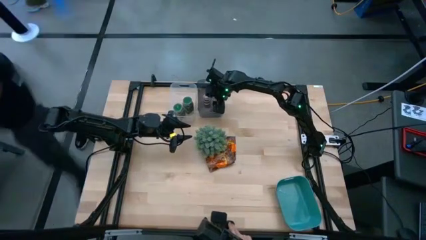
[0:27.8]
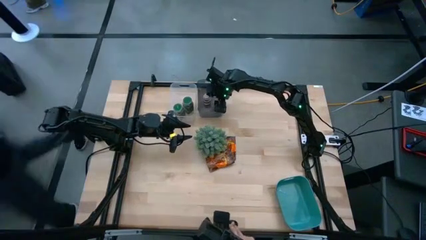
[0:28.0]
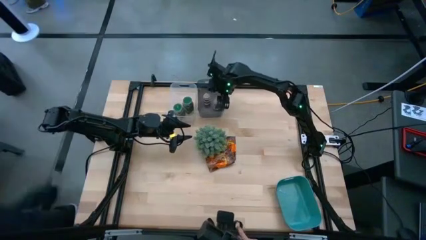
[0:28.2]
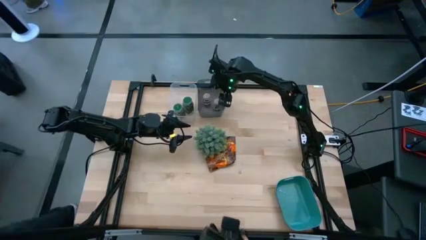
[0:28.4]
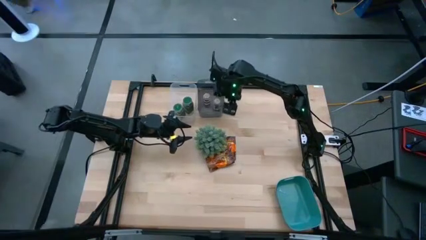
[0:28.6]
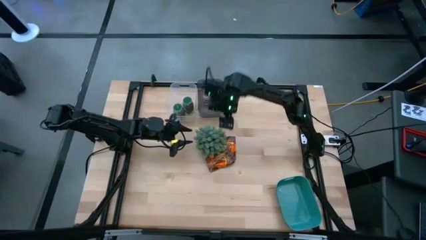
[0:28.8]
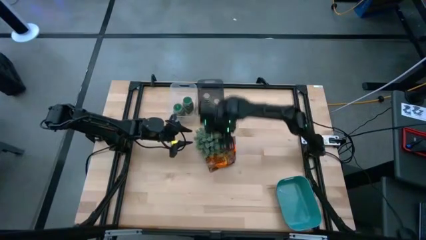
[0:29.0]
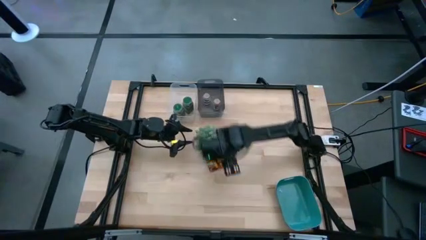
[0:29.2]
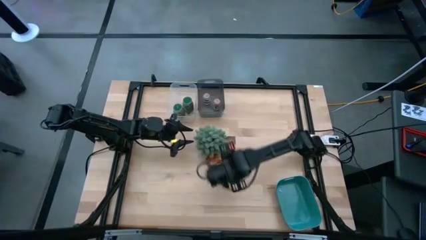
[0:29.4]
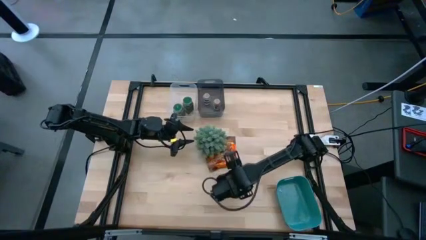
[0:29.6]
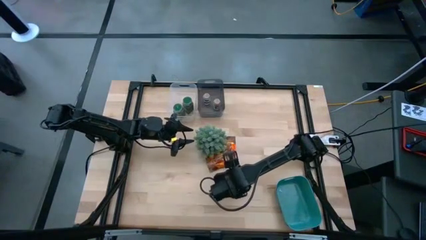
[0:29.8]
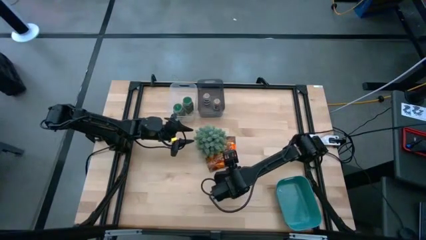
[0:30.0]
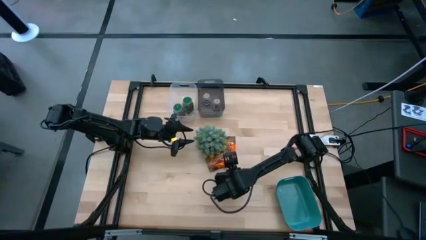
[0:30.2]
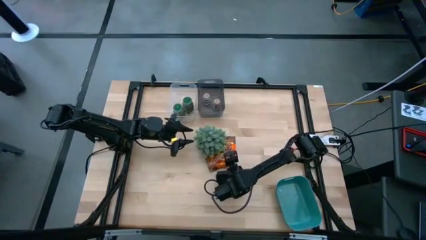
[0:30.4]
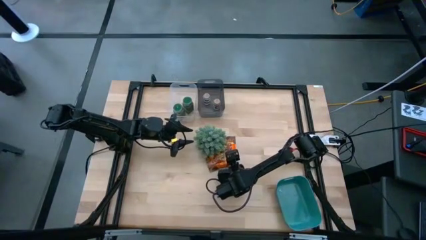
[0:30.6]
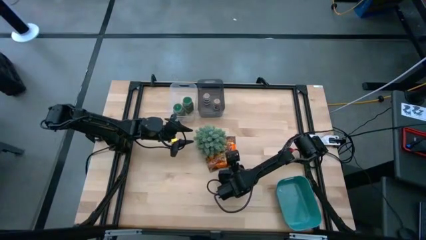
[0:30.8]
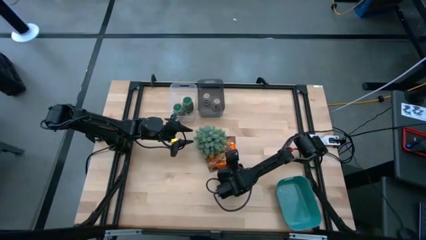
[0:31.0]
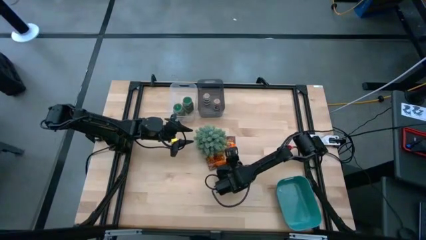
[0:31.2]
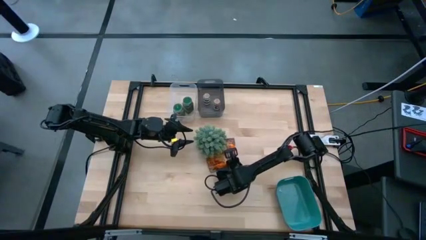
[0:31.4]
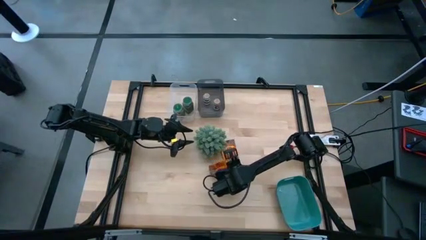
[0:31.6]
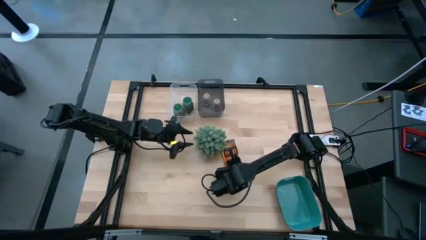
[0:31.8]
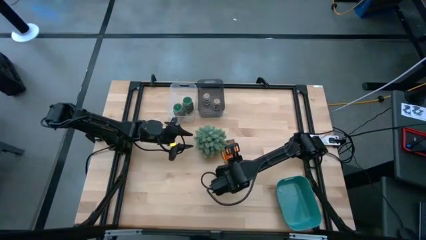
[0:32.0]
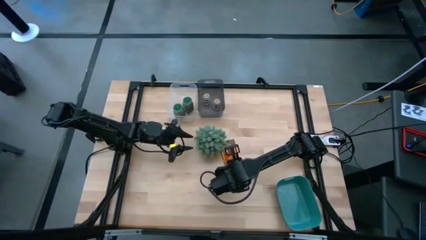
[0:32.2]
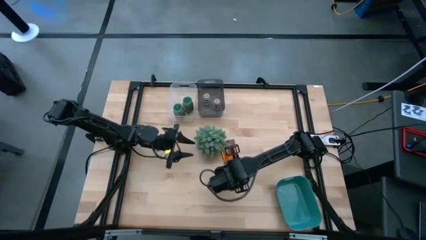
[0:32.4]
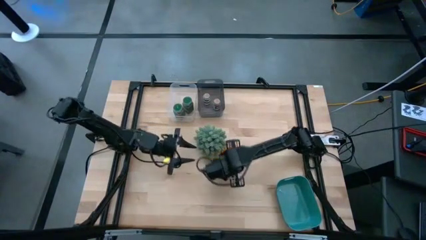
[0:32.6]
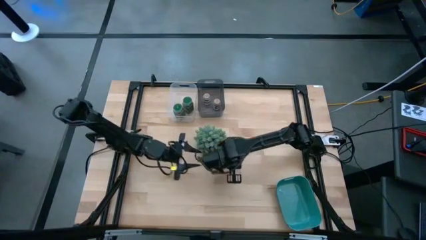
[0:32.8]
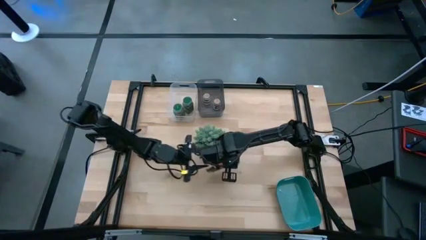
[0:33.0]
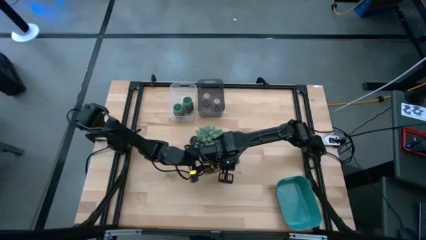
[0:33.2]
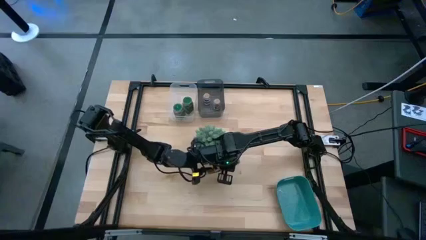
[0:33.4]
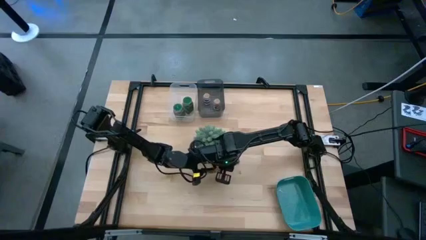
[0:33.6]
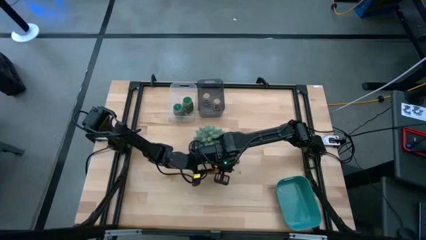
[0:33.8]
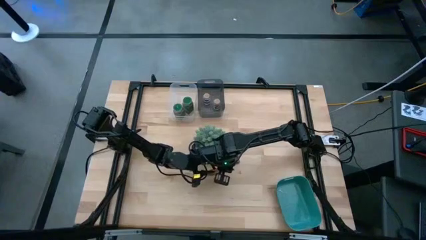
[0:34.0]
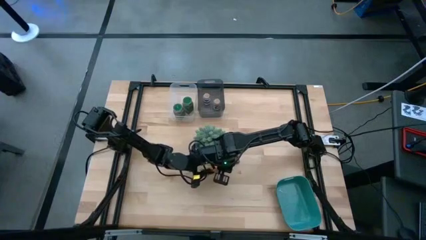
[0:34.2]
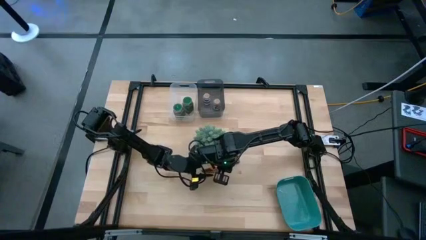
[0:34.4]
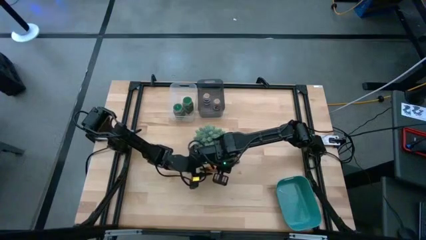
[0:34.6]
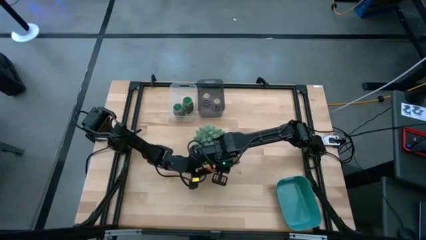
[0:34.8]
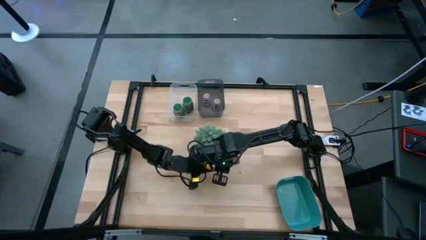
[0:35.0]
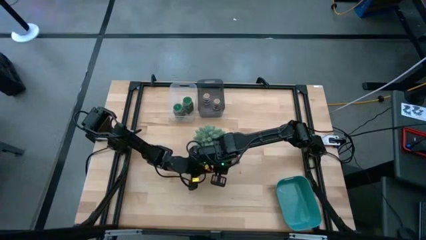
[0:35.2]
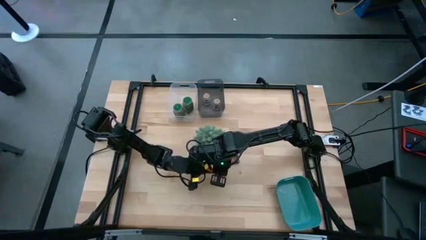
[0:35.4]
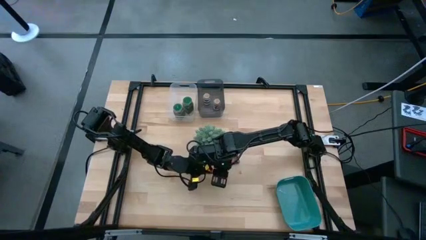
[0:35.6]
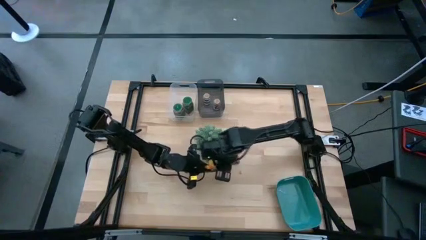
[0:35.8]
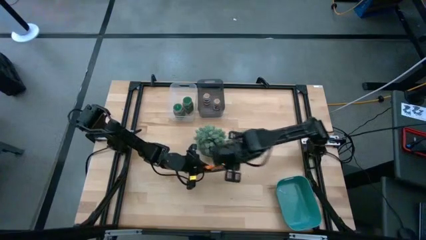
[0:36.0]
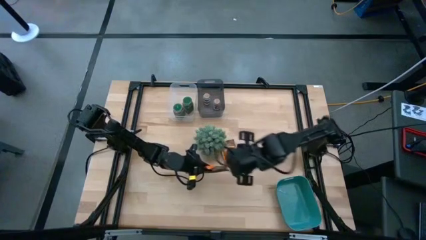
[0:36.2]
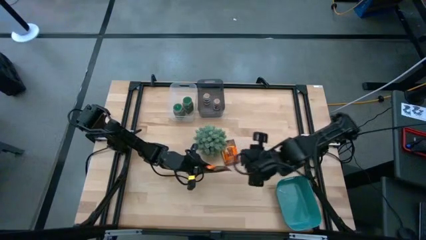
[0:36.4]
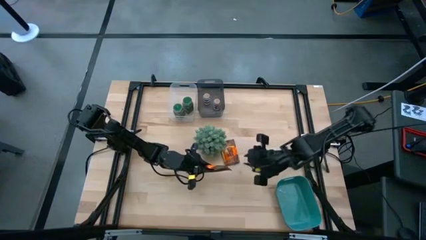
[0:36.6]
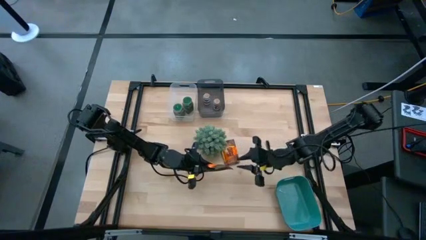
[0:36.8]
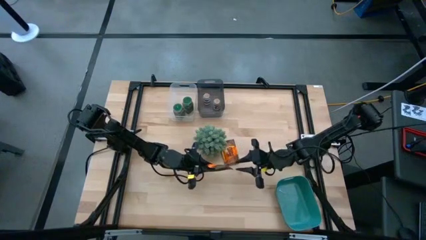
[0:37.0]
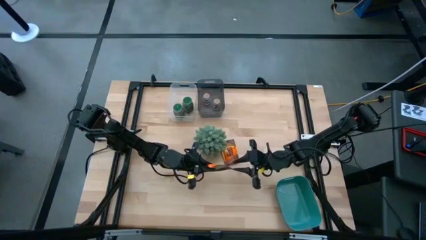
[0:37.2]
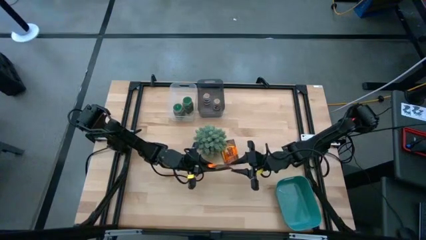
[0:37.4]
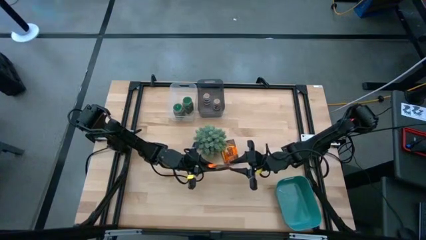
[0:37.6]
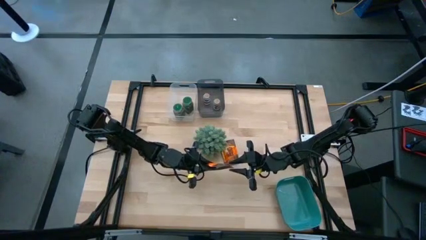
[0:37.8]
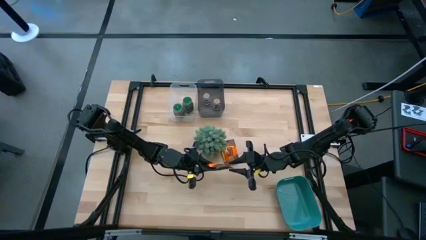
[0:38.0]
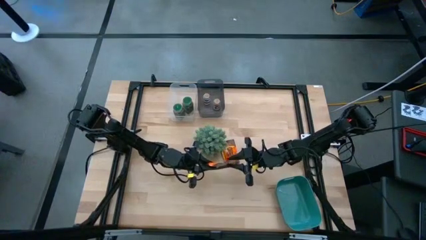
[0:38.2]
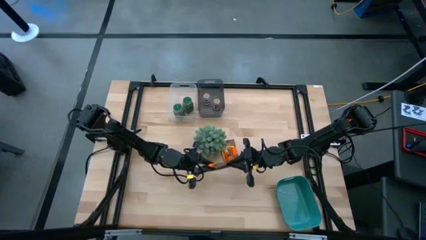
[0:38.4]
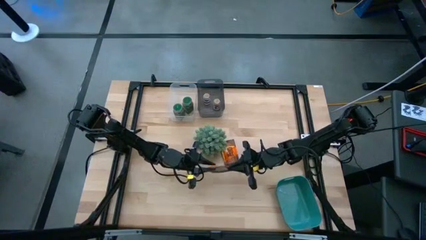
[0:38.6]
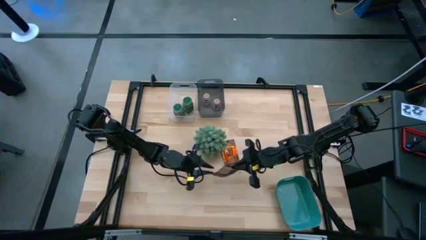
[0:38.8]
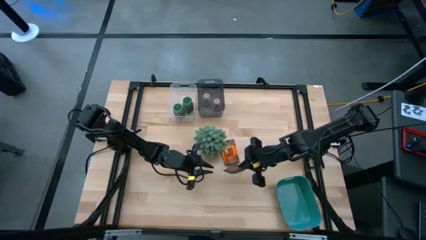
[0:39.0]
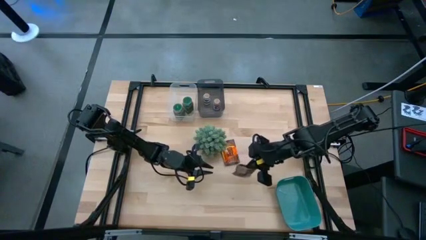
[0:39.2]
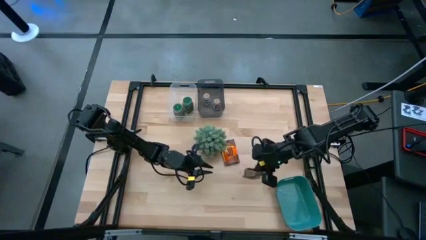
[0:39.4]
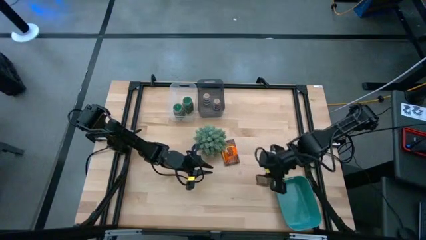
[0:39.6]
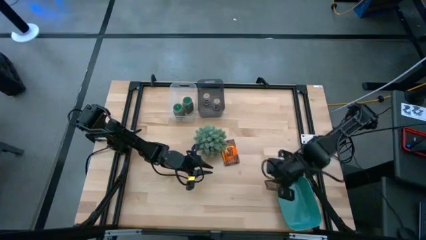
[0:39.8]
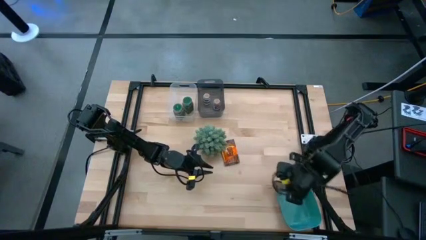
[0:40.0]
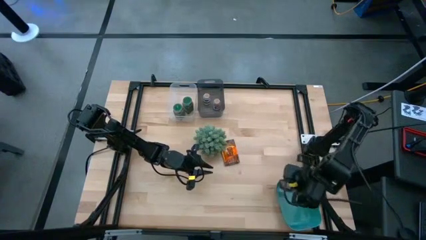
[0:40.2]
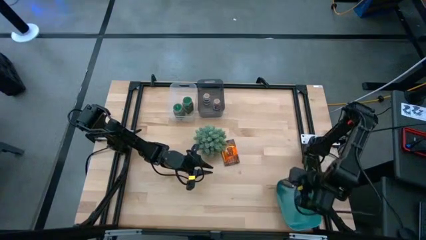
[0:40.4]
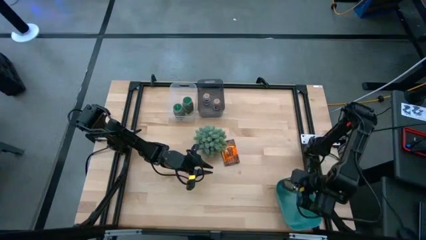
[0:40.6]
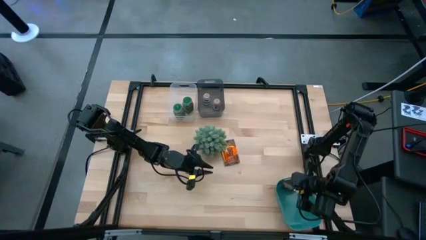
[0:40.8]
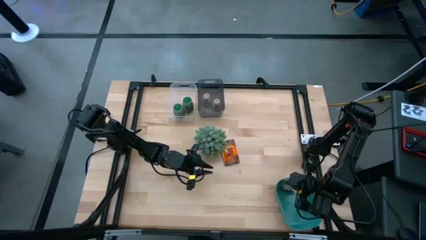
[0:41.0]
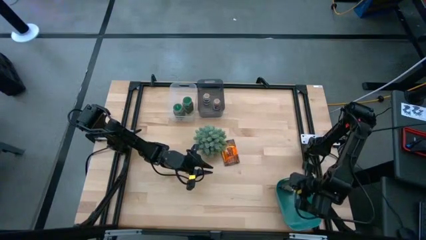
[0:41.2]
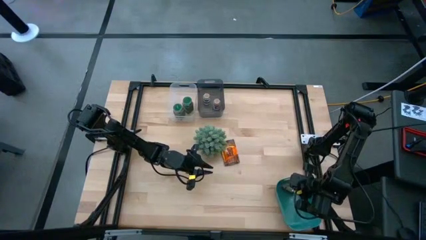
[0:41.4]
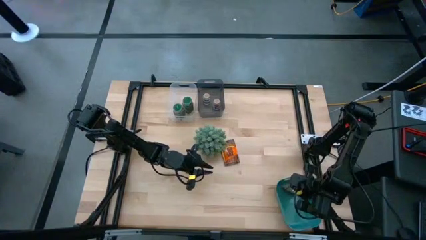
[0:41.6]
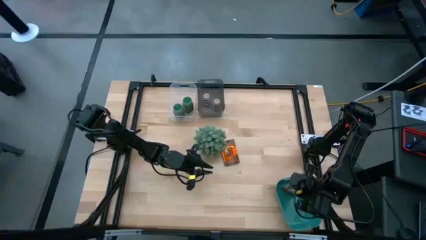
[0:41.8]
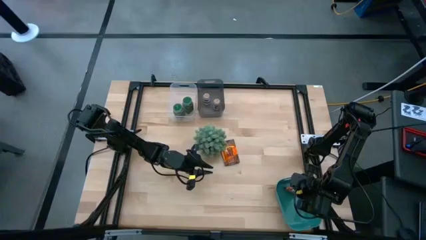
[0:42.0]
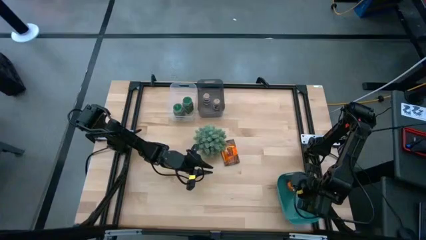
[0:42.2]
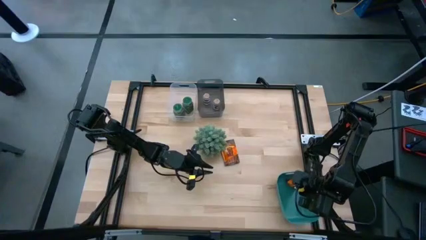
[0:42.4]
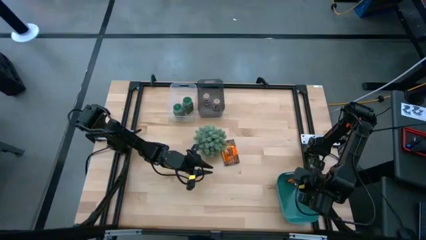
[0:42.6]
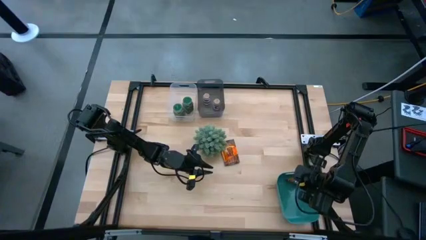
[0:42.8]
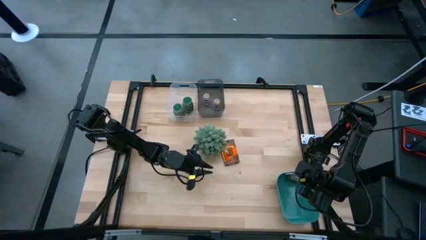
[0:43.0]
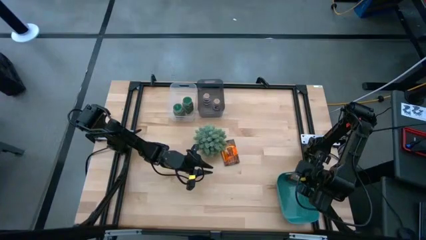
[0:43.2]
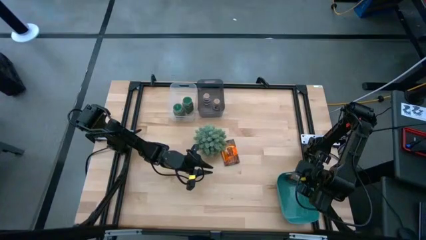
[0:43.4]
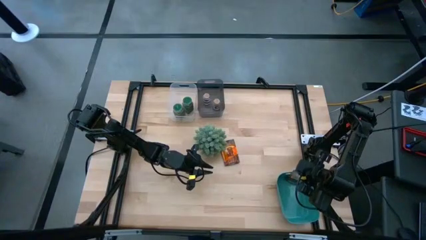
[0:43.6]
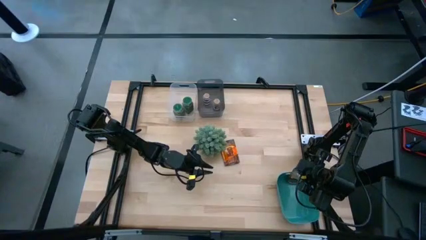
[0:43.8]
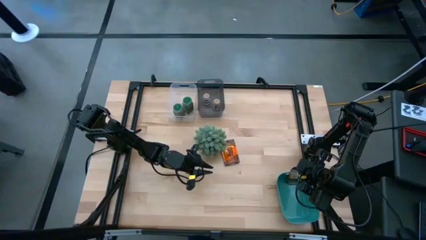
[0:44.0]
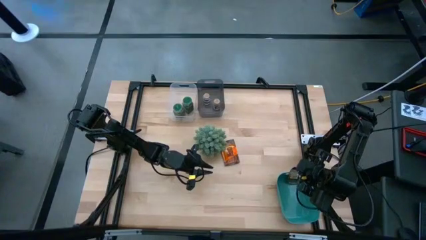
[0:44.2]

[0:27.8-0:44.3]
Task: Sort spices by type
Put the bottom orange seasoning pack into the blue bin
